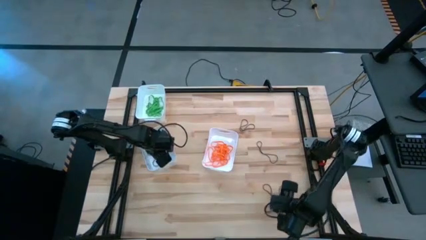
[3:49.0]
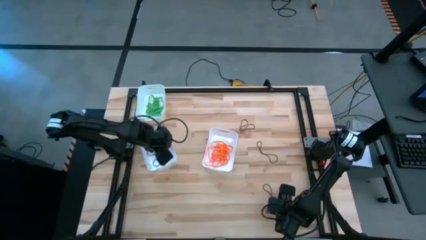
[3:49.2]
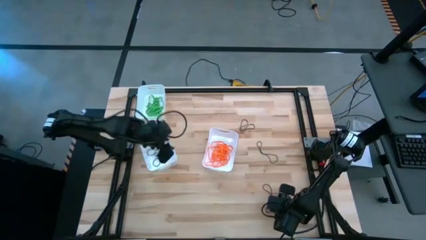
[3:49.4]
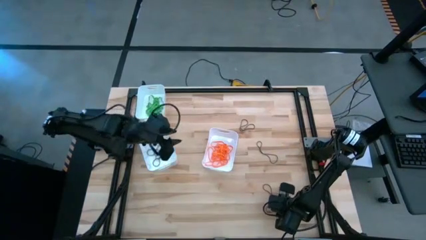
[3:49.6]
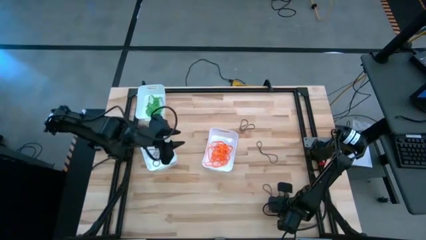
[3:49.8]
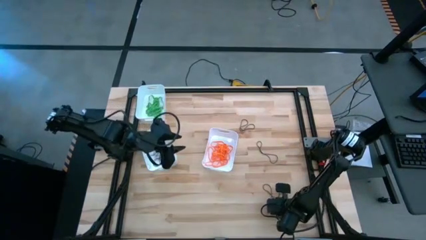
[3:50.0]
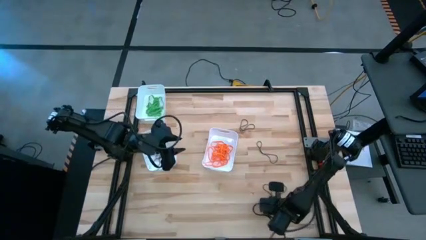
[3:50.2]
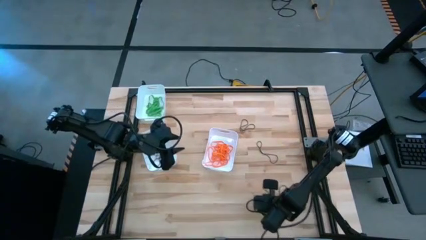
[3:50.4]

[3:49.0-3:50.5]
Task: Sort rubber bands into baskets
Put the violet rubber band into the bottom left white bin

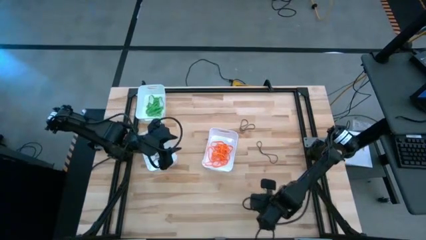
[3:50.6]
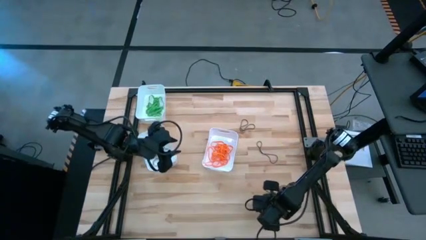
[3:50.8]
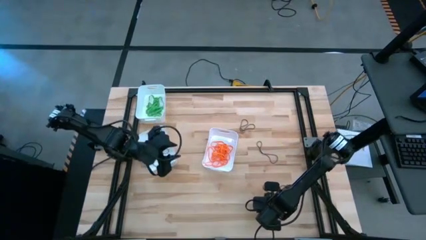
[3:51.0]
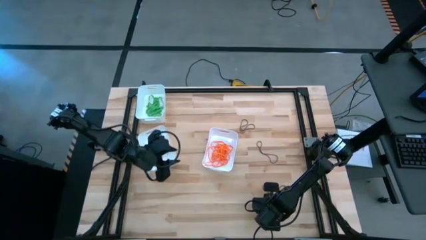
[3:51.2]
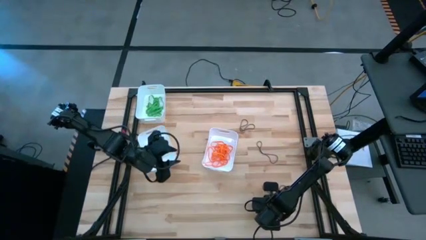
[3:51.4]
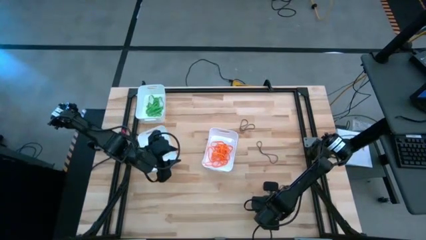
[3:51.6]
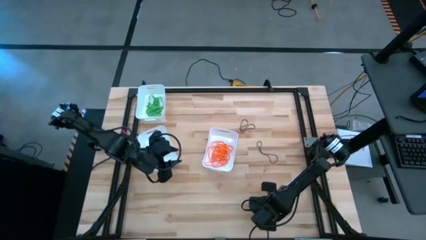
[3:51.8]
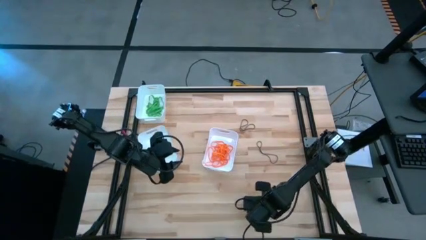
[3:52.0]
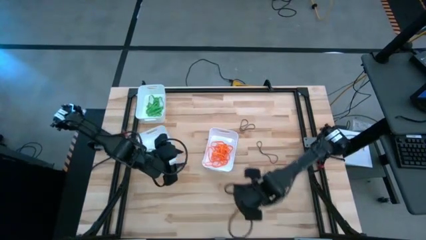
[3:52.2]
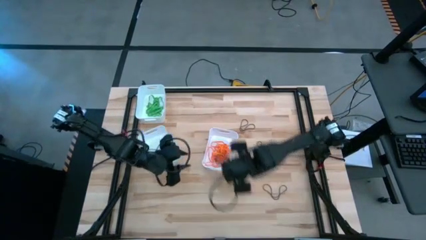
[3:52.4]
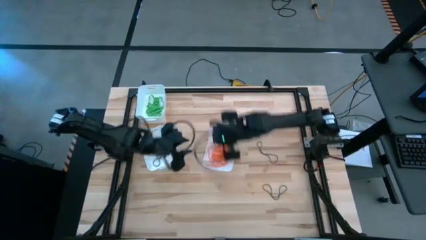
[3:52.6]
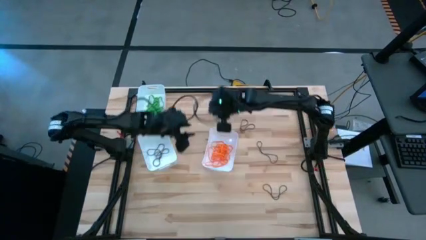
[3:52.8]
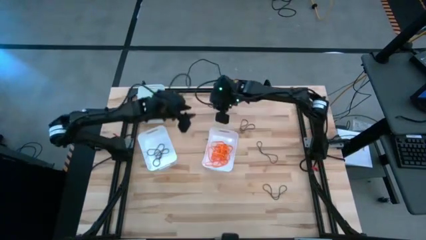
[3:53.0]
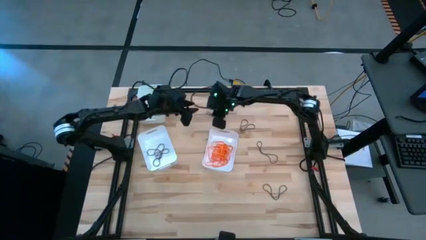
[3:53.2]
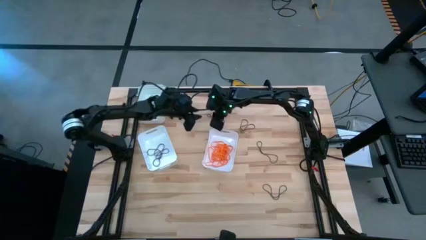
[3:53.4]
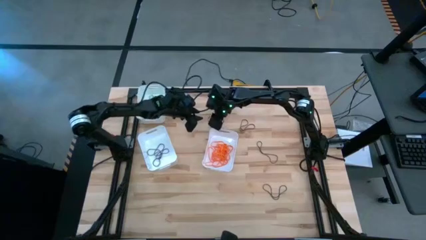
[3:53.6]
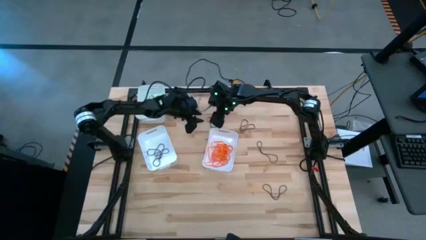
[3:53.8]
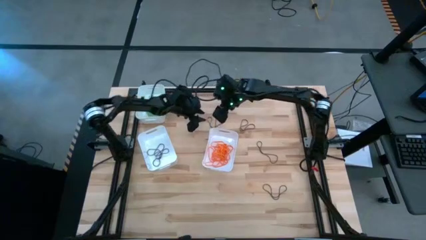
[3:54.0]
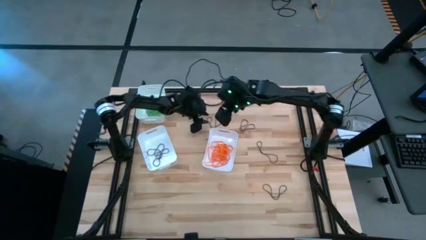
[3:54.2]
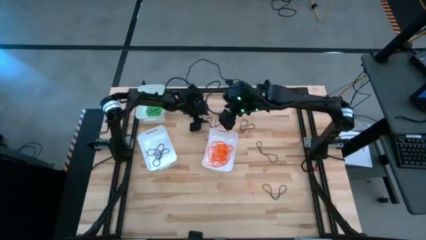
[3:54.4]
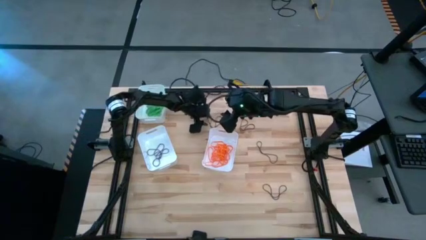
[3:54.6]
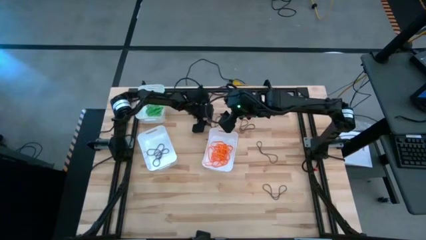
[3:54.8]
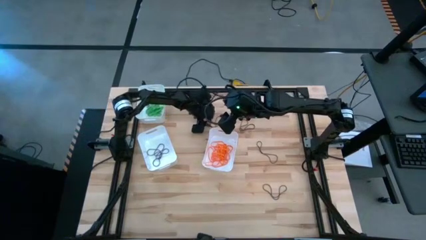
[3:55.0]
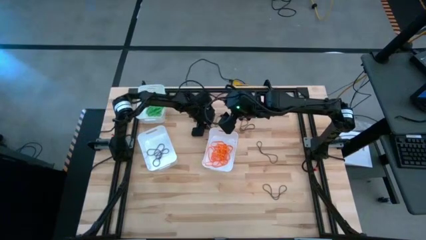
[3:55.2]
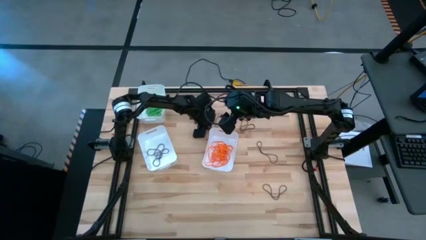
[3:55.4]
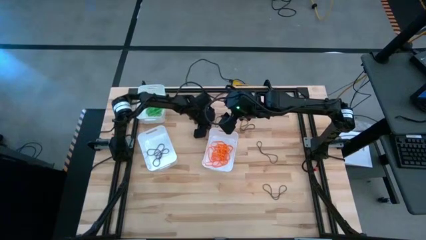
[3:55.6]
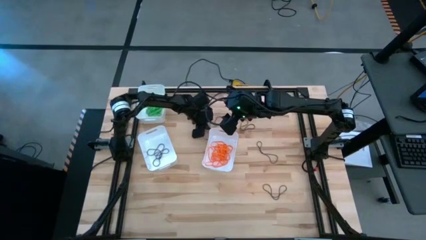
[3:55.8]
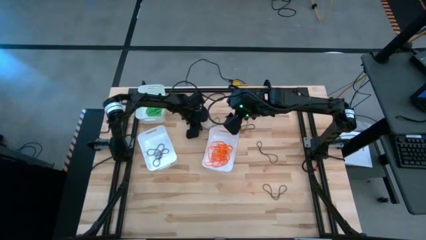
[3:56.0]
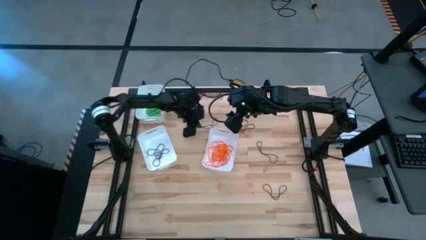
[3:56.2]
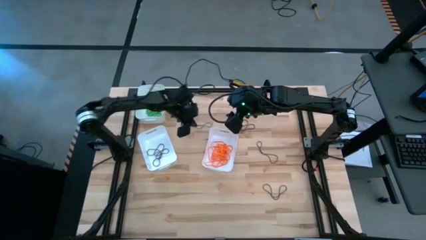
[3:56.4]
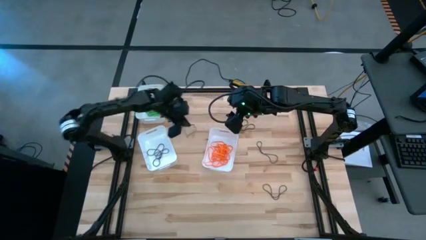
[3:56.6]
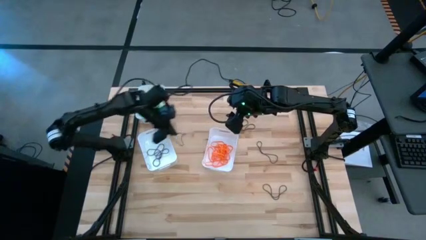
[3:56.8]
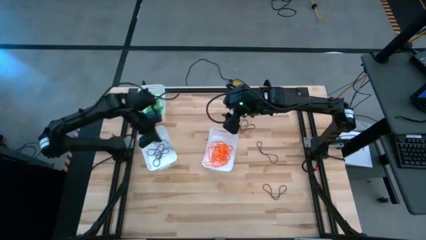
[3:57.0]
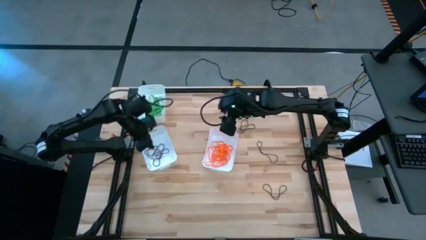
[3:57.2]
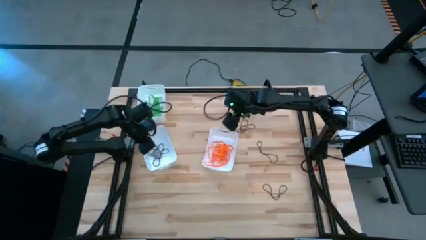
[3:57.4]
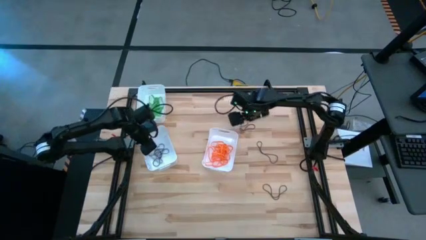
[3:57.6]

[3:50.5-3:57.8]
Put the violet rubber band into the bottom left white bin

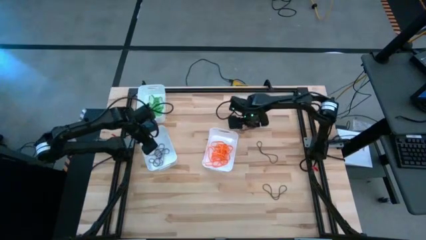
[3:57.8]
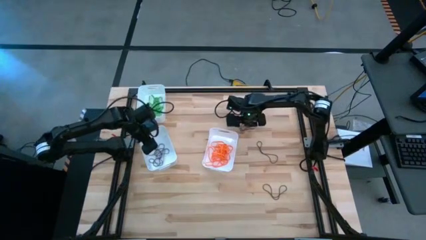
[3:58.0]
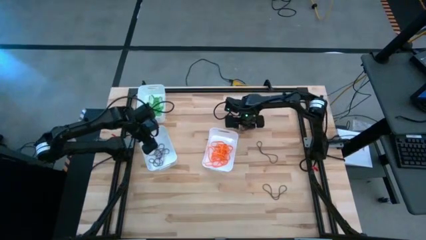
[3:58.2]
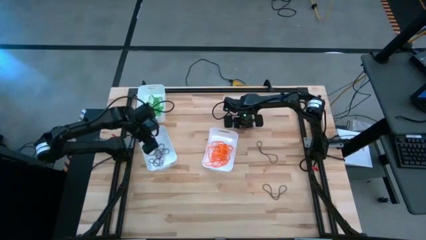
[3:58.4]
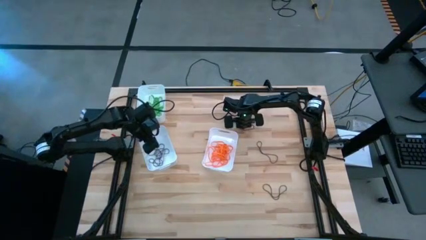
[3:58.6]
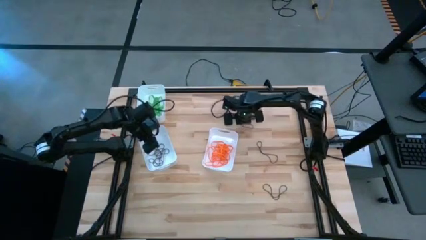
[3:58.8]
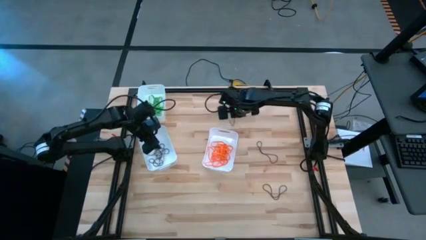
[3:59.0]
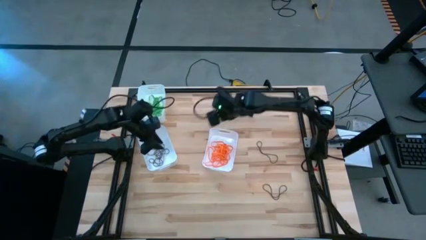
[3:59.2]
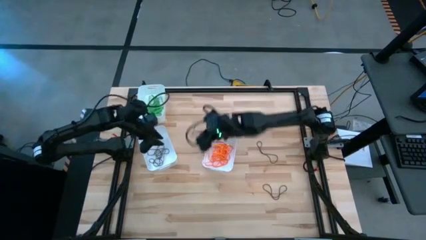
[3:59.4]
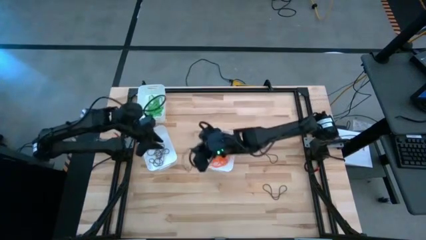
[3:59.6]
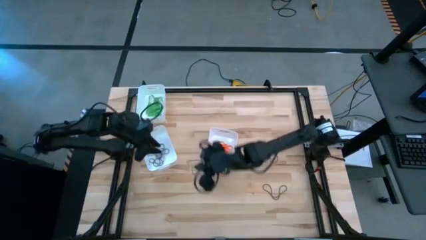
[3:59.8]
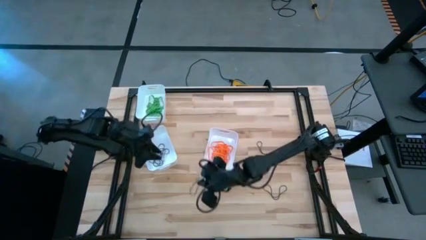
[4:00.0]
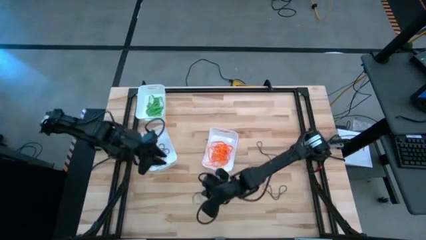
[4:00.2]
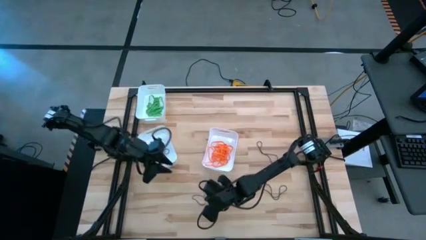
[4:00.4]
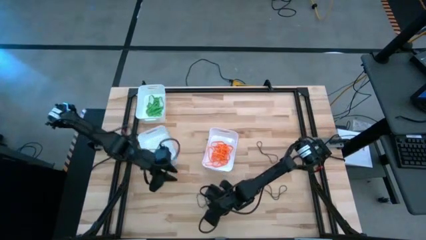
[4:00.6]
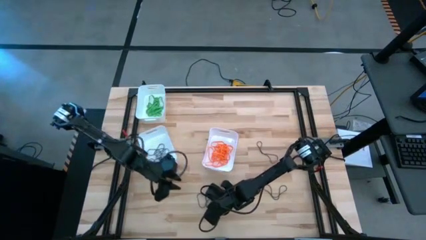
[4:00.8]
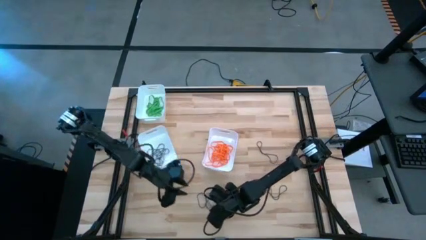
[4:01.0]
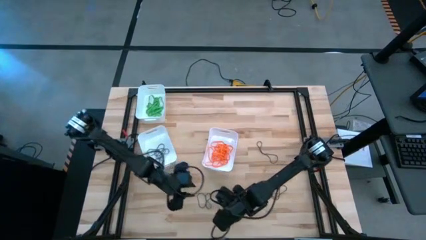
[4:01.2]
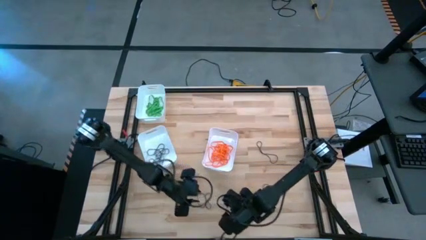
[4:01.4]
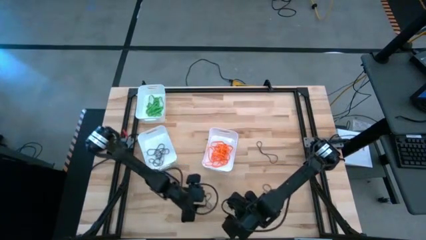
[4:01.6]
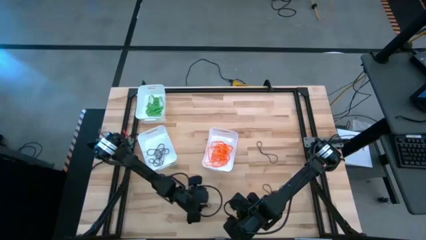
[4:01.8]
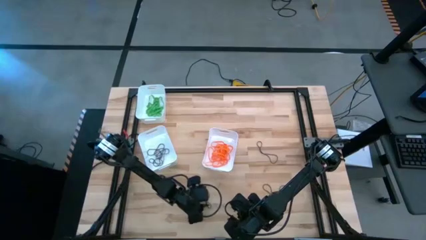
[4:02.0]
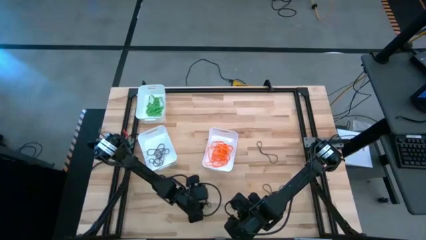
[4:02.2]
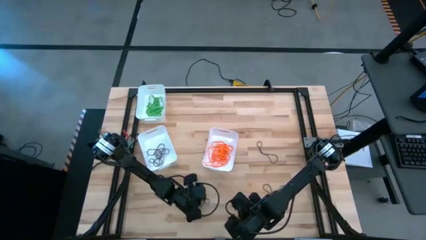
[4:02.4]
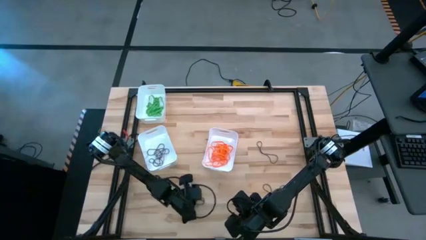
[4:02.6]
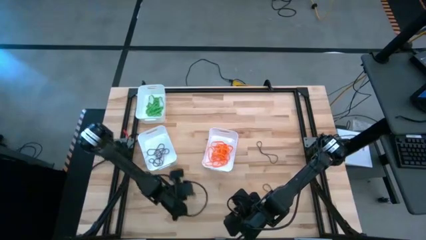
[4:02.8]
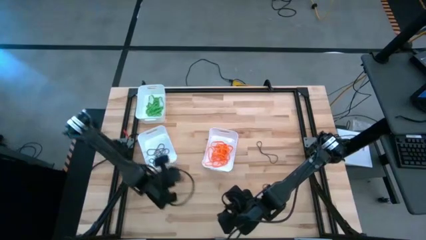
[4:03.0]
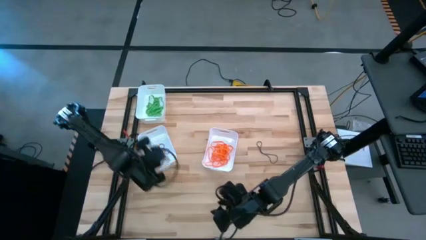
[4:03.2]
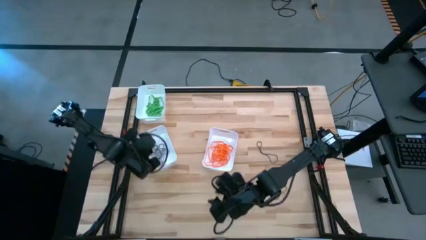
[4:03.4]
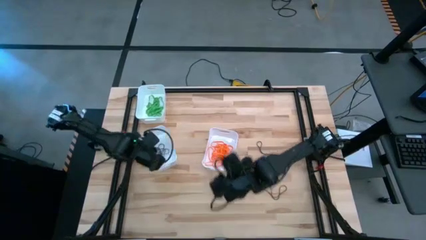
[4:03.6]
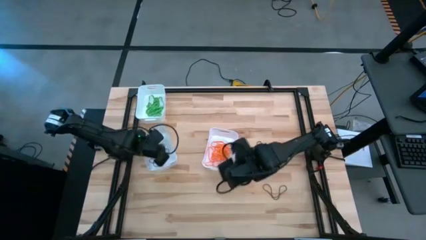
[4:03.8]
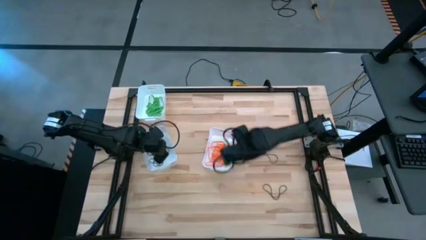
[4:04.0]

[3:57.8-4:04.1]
Put the violet rubber band into the bottom left white bin

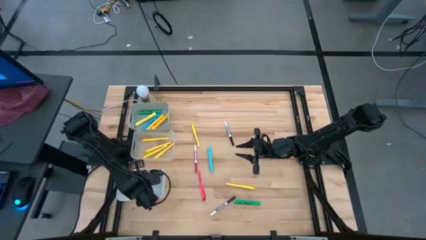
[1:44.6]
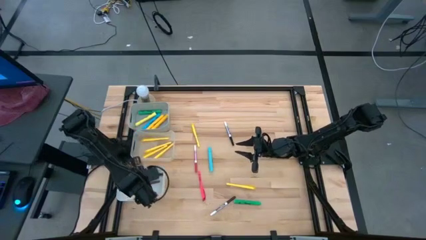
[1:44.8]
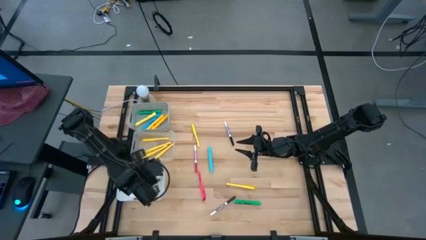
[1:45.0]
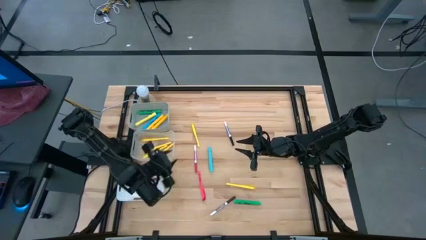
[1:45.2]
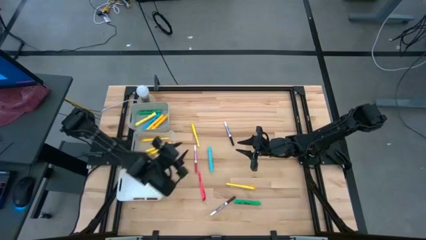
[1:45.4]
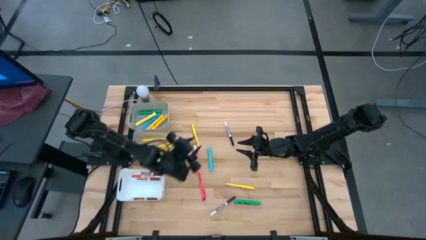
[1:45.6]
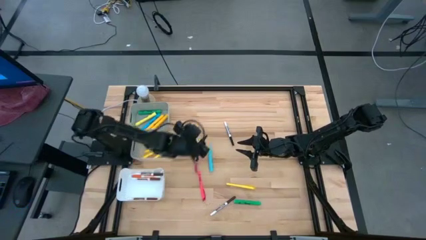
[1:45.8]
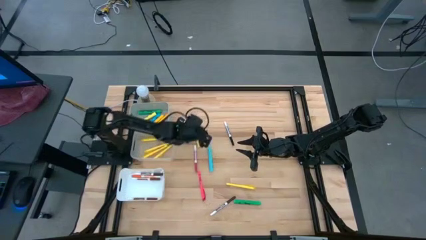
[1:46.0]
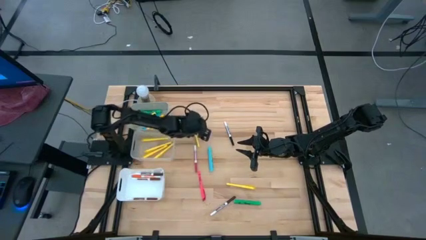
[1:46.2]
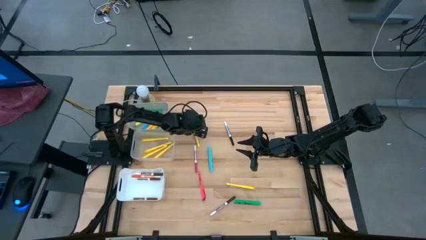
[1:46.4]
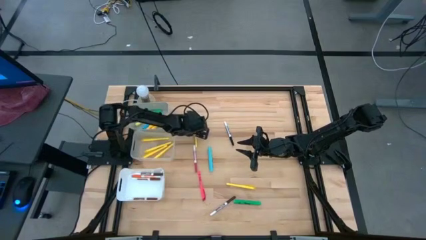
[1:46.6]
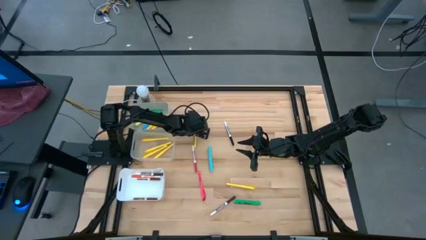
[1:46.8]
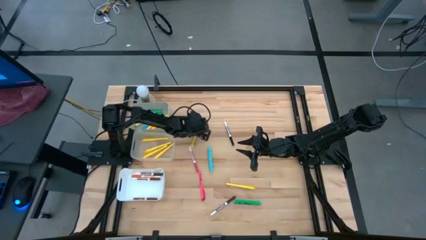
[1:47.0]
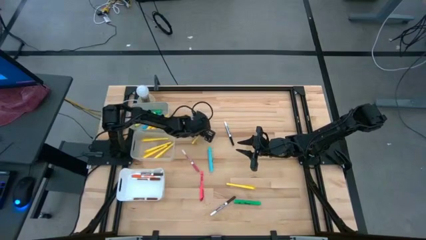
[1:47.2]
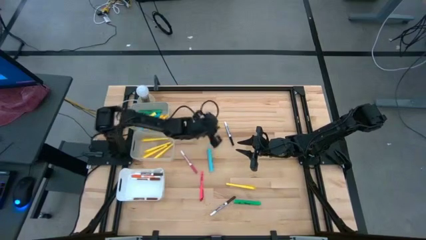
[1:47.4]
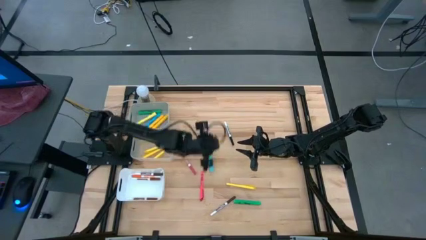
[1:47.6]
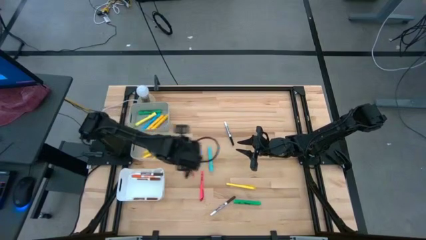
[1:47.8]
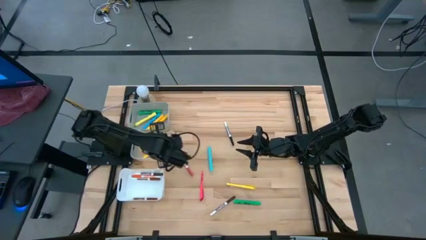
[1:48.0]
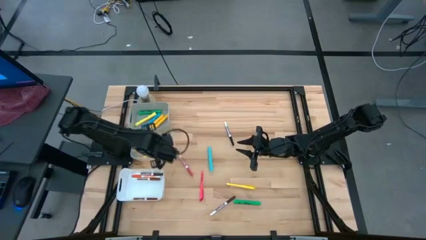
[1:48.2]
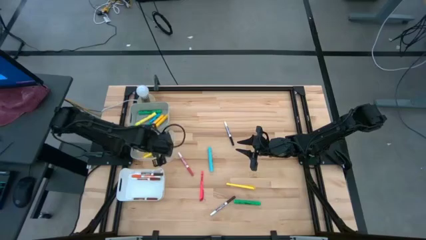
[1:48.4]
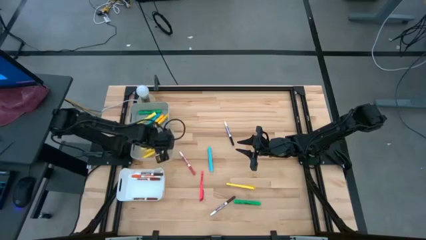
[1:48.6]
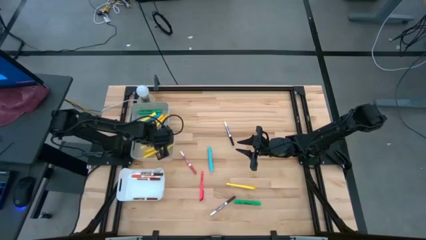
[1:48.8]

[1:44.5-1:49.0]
Task: Pick & Place Markers
Put the yellow pen into the transparent bin
